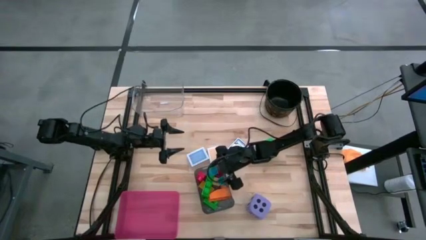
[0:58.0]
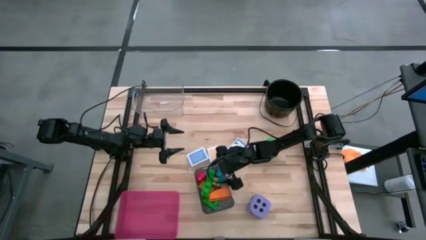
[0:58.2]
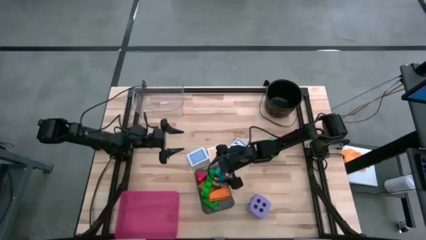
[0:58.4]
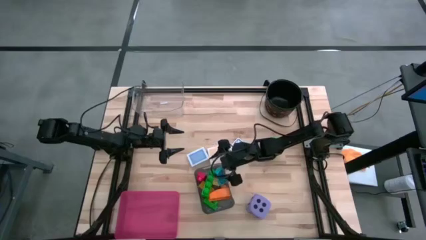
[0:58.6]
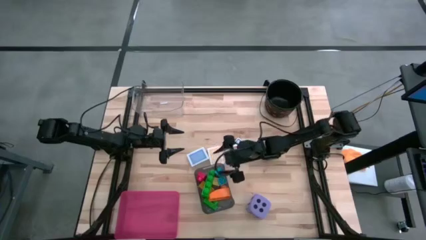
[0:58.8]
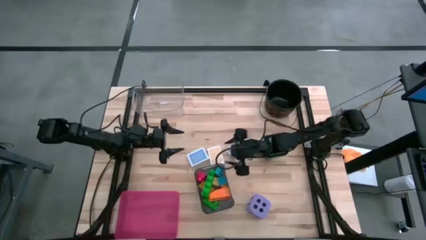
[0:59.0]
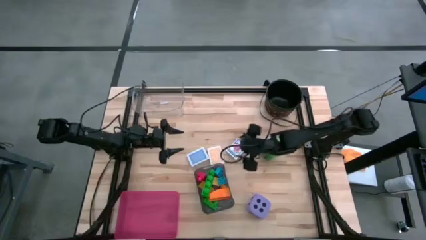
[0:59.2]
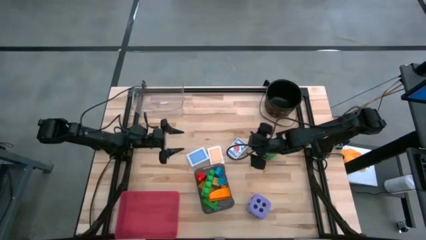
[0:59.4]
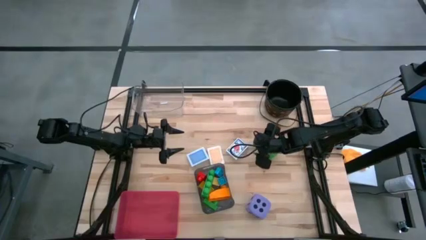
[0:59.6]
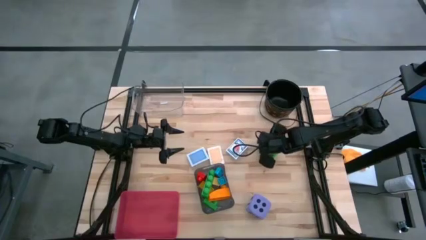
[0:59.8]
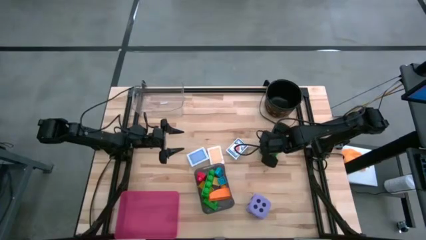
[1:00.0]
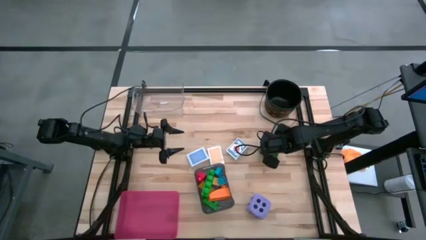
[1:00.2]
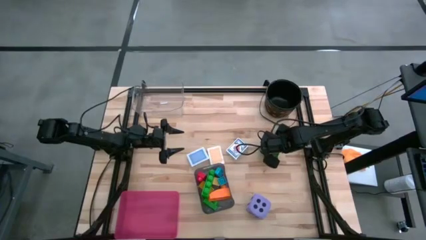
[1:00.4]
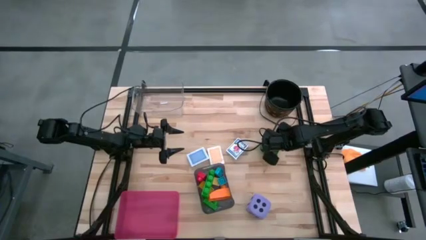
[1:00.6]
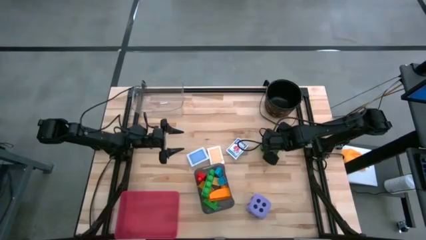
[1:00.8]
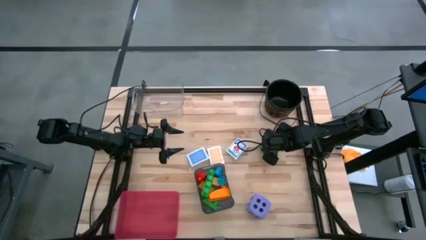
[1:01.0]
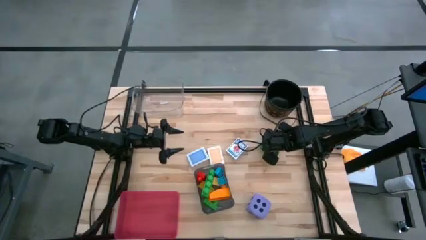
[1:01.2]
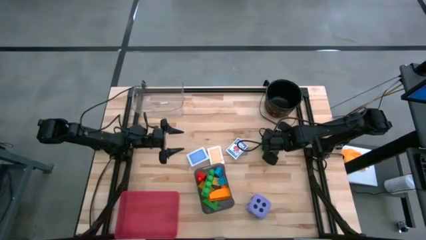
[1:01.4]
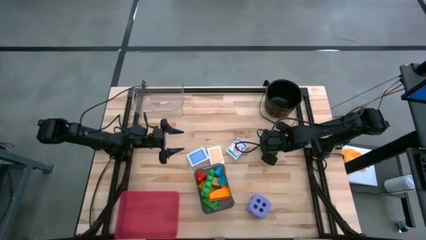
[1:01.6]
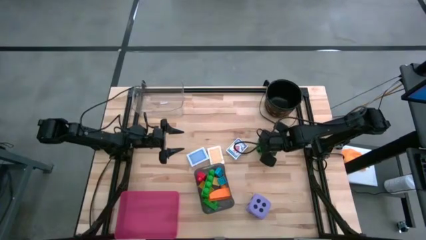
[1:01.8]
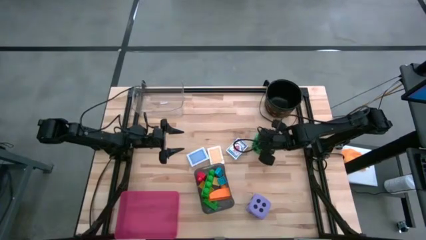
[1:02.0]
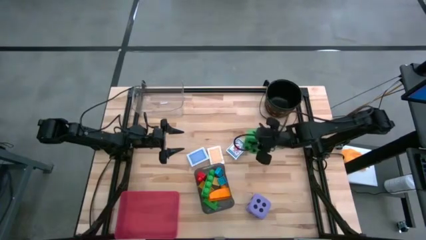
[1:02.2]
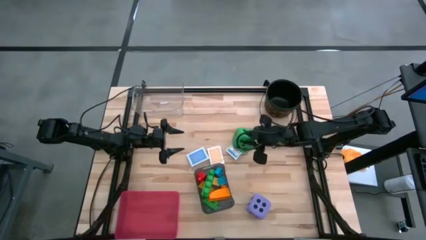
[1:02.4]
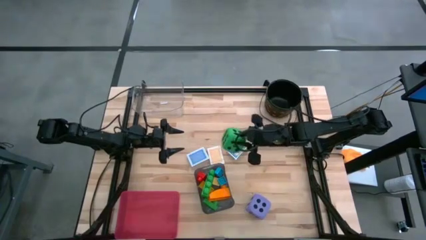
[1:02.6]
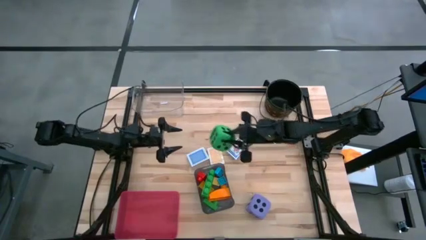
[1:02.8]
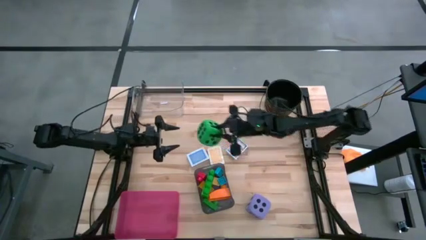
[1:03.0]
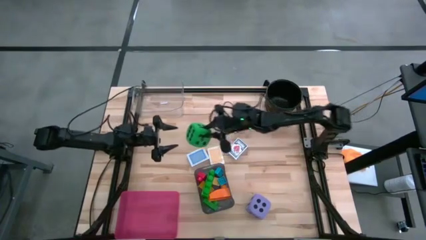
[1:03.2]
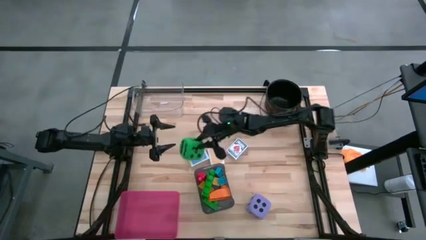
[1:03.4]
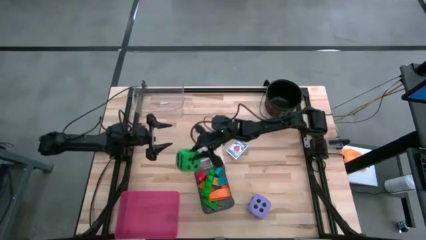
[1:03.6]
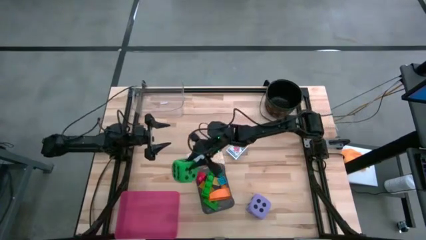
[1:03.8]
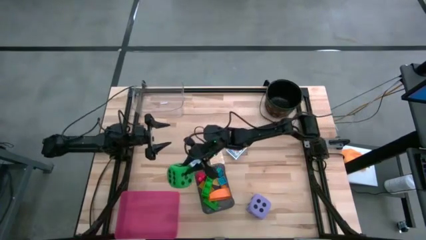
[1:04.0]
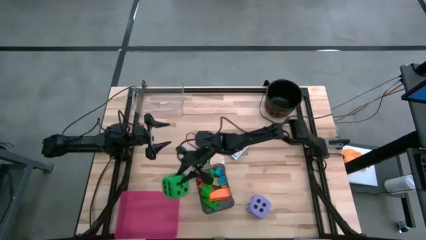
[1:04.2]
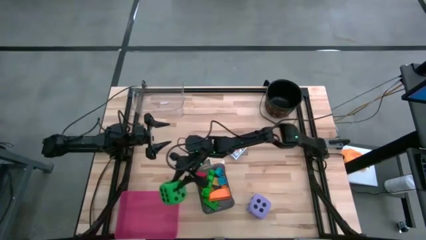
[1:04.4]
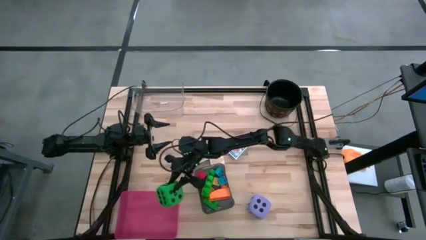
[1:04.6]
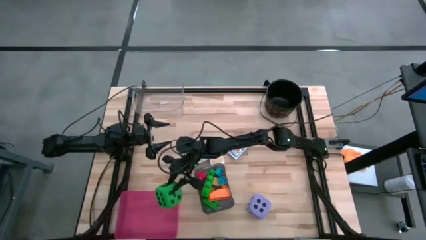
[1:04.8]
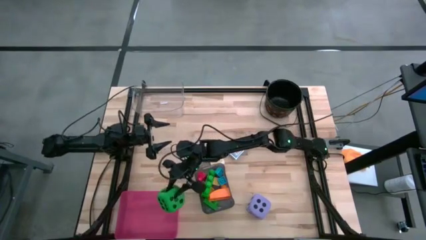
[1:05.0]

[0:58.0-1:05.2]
Task: Pick & Place Toys
Put the green die into the pink bin

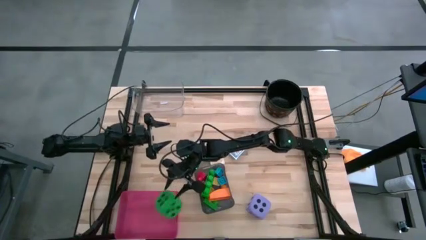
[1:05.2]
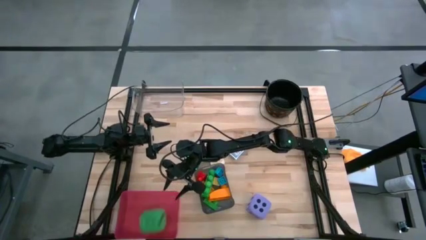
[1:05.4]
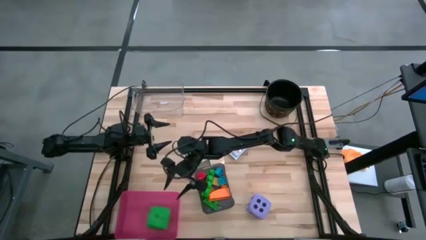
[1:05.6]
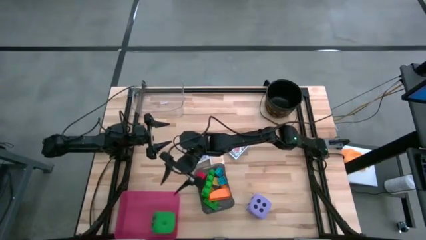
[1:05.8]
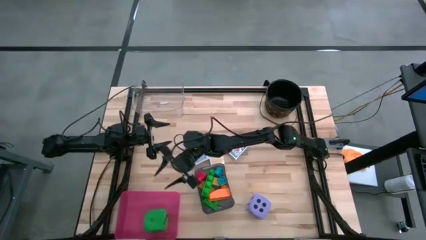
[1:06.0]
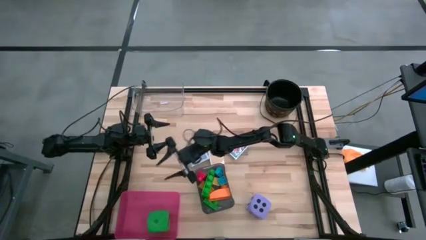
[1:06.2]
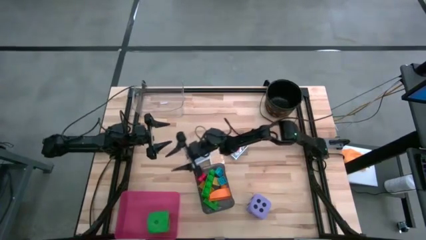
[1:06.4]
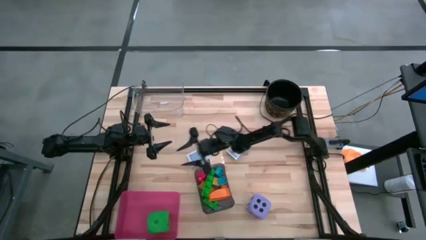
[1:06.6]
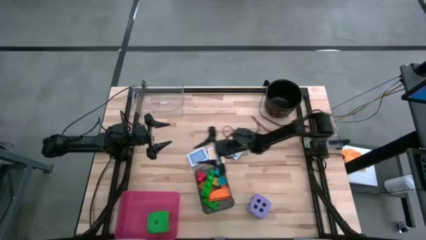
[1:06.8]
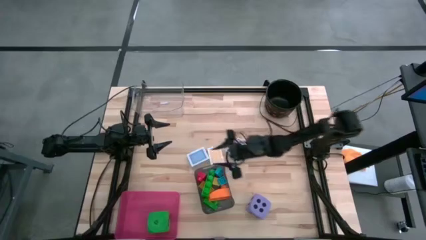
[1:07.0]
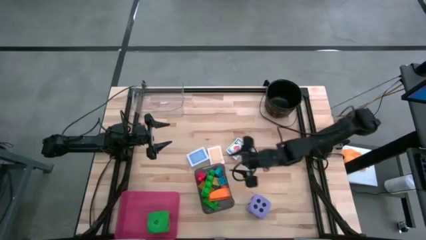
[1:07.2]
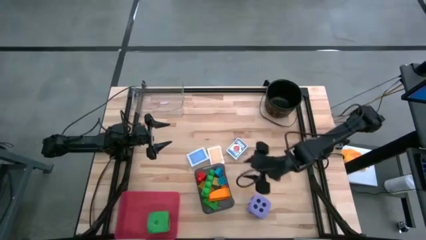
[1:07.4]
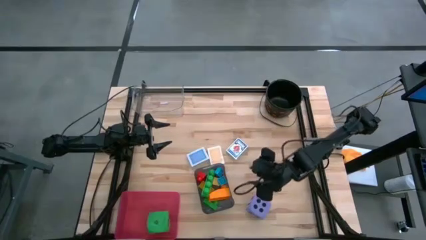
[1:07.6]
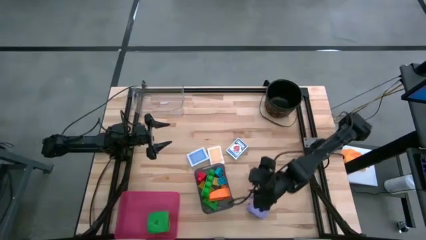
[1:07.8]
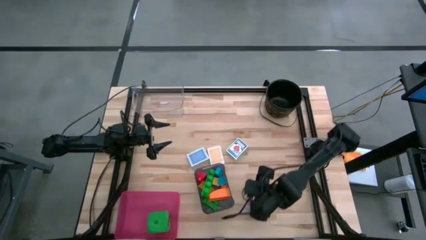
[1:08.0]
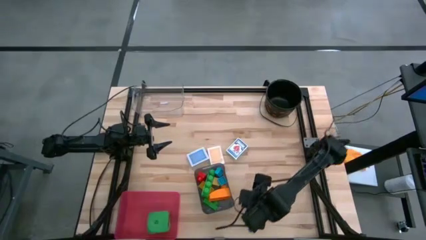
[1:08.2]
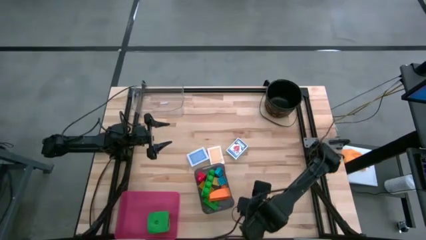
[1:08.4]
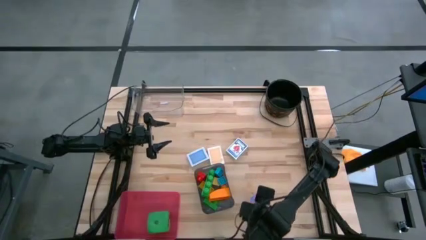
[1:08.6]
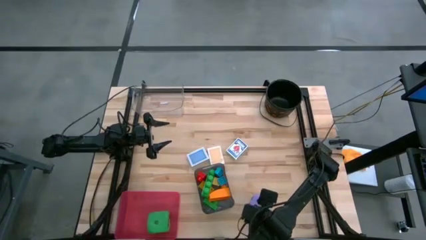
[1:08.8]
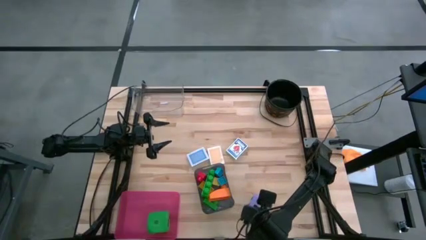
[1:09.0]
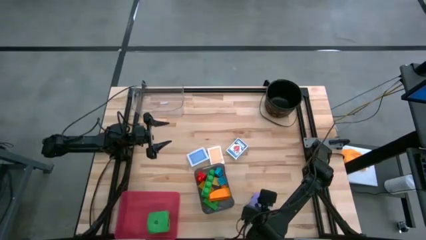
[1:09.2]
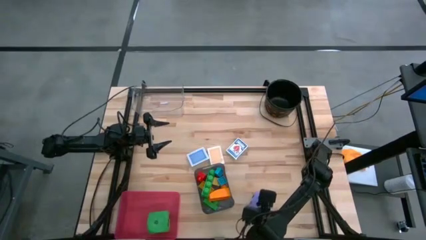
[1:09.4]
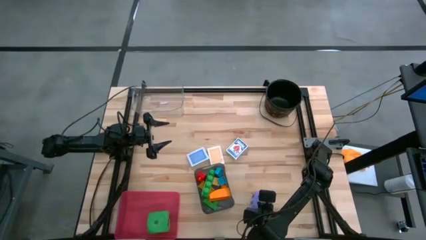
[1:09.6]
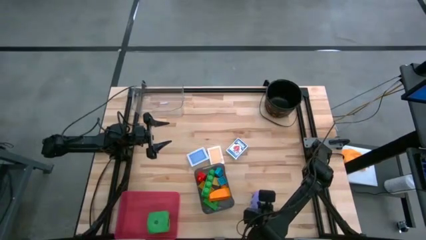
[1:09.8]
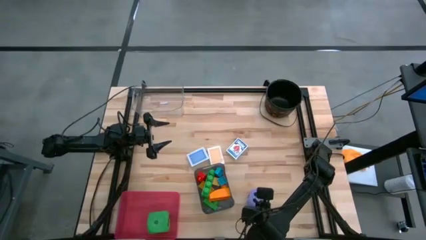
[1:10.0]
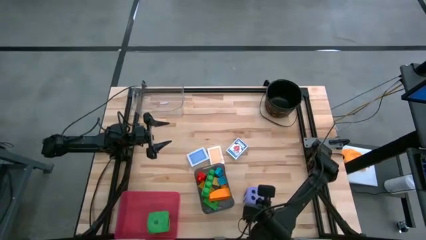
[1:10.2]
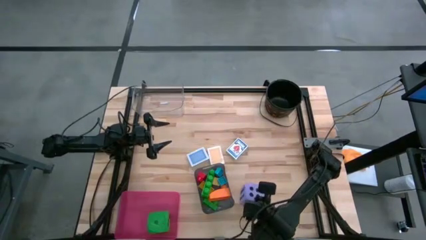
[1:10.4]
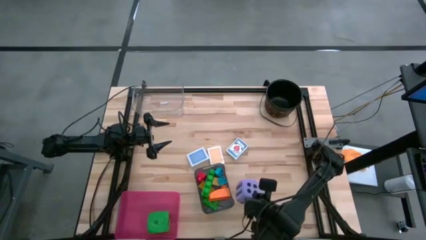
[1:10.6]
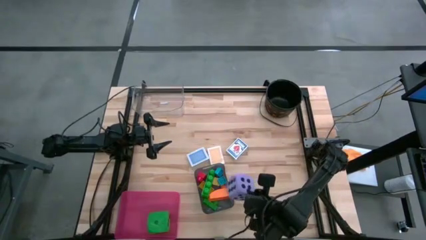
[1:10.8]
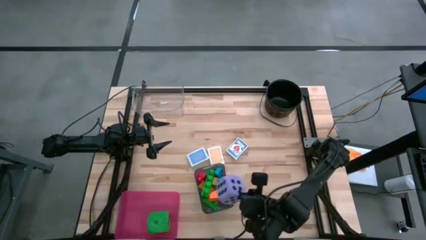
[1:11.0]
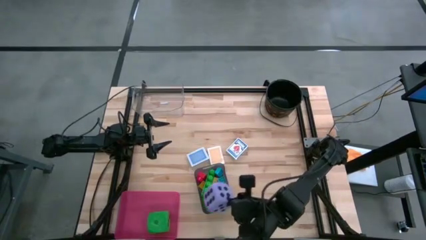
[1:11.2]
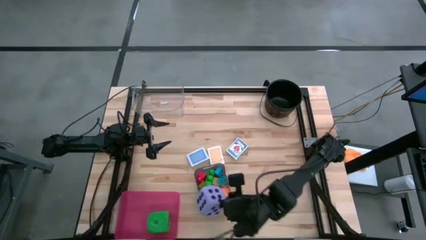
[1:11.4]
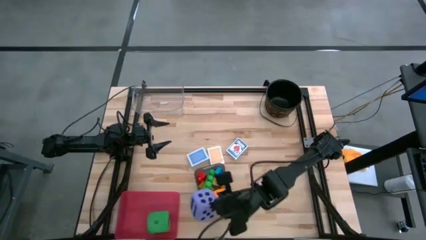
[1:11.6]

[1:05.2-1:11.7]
Put the blue die into the pink bin

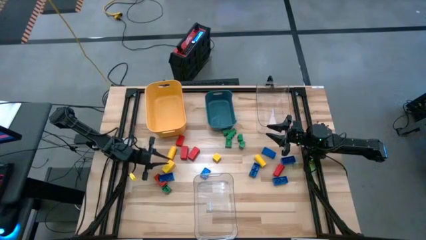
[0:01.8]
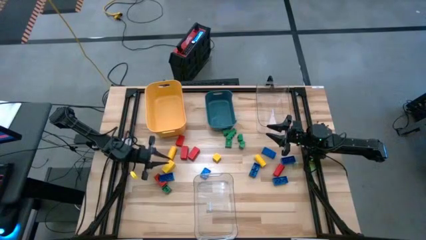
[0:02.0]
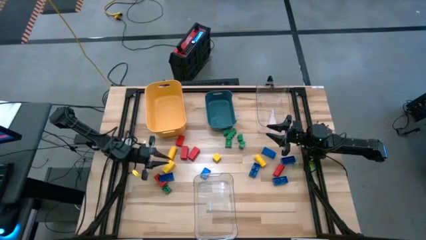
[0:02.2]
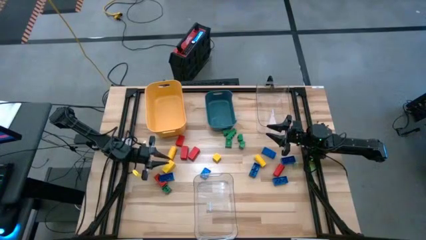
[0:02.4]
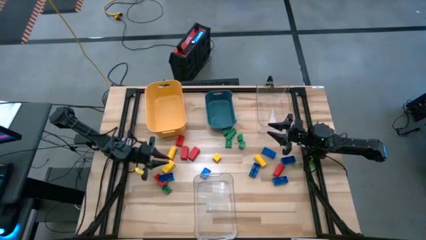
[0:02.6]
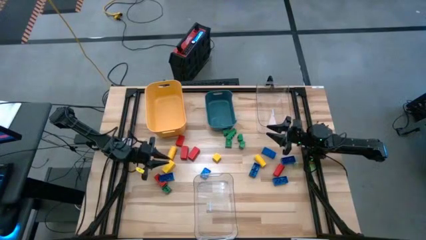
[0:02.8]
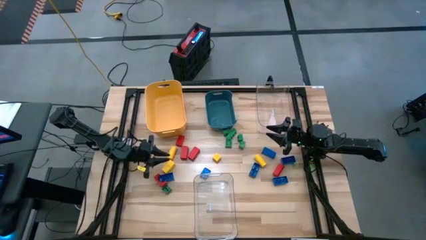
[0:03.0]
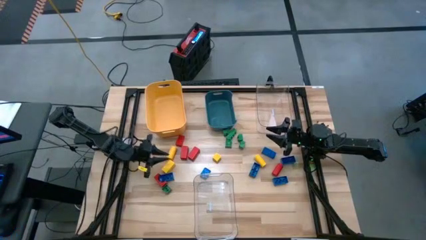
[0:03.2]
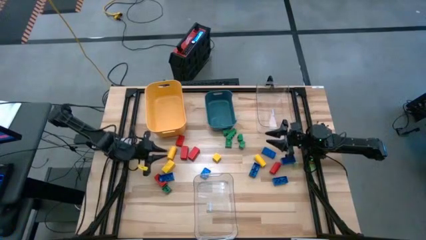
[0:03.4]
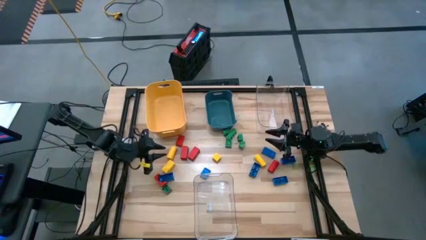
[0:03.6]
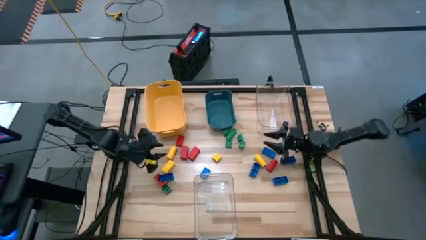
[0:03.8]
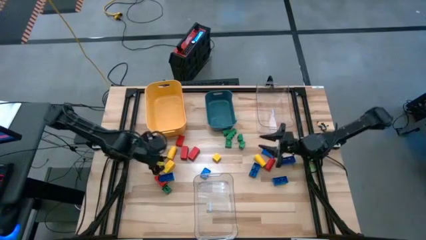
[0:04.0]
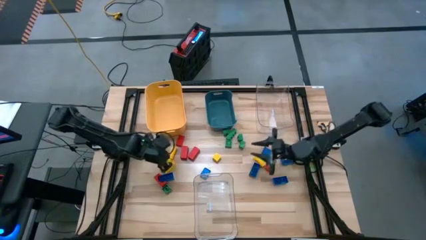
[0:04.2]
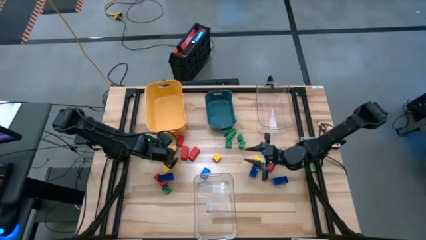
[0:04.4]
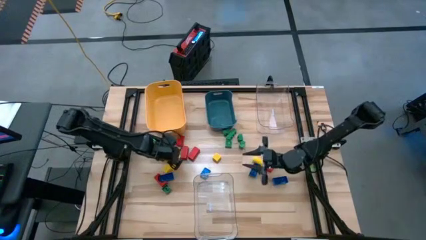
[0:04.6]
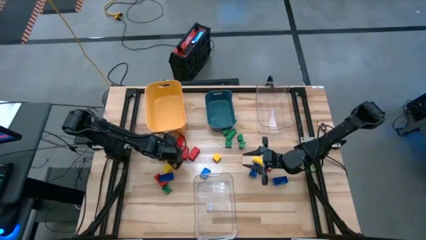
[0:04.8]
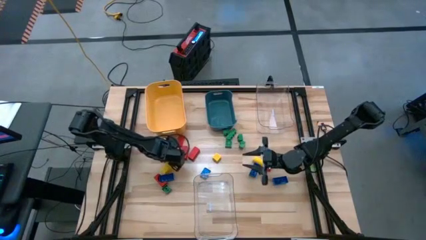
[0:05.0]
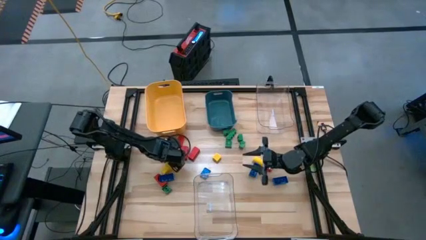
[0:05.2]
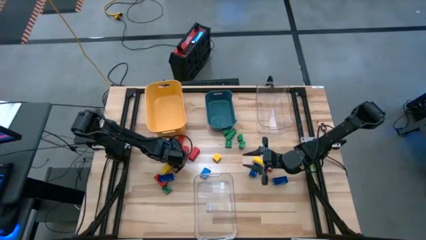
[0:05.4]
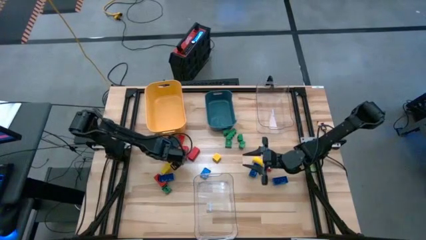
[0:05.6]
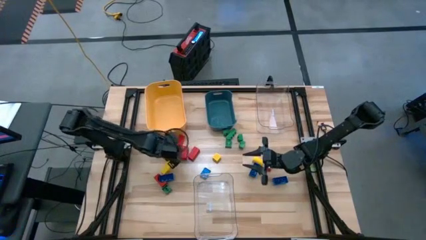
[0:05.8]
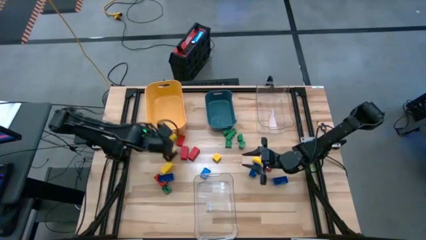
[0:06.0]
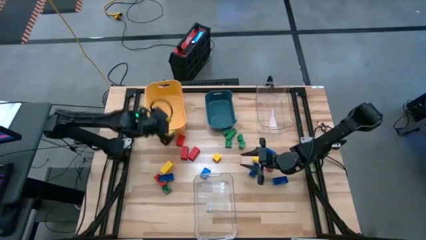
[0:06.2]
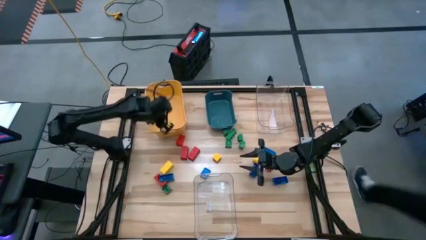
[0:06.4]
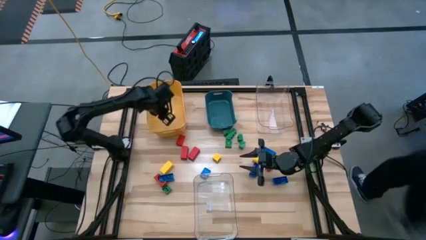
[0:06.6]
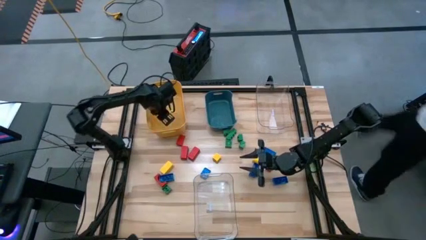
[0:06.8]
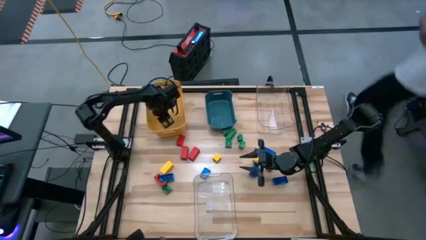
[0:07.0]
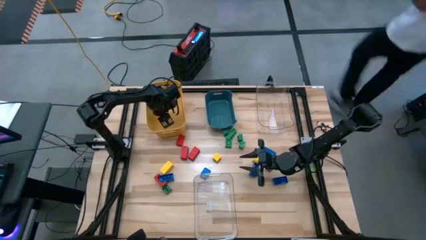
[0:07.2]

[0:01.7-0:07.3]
Task: Sort blocks
Put the yellow wooden block into the yellow bin
